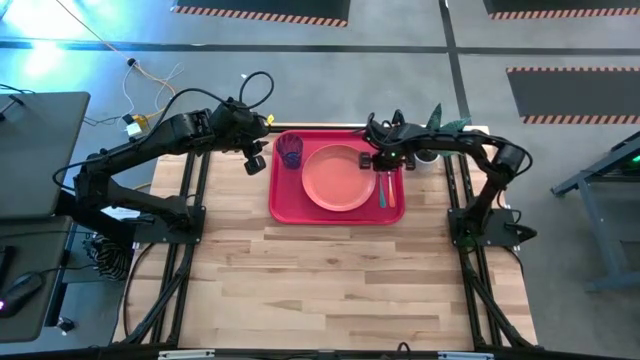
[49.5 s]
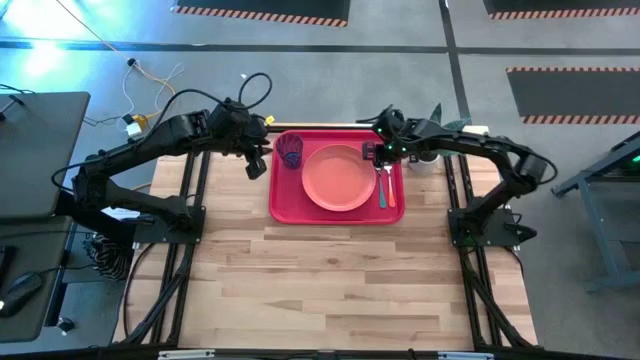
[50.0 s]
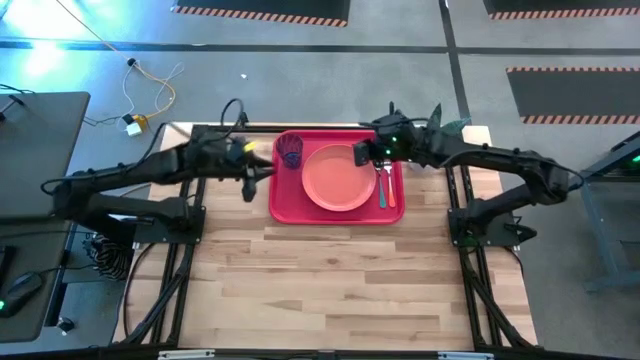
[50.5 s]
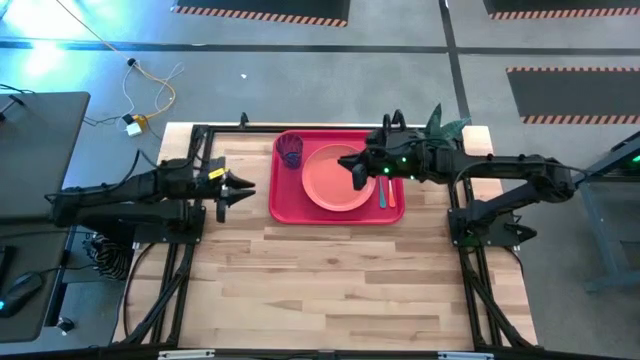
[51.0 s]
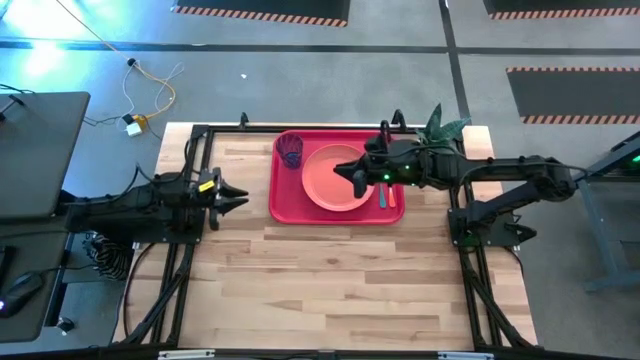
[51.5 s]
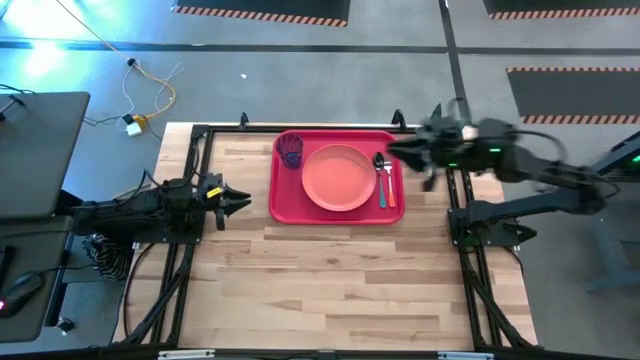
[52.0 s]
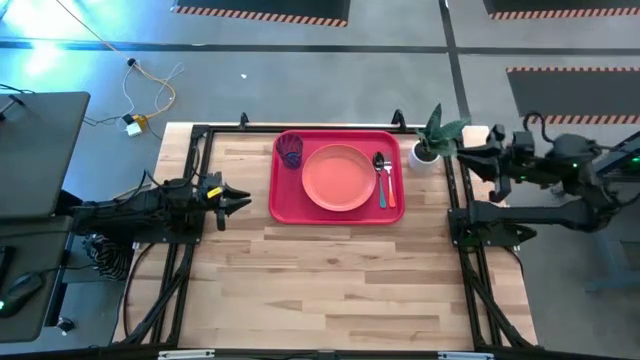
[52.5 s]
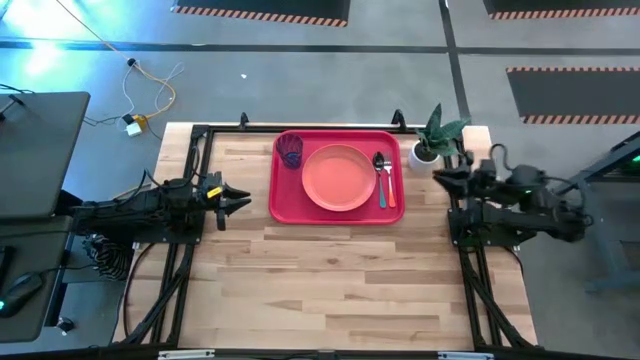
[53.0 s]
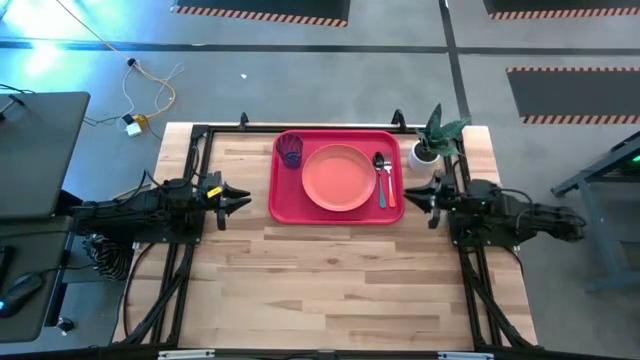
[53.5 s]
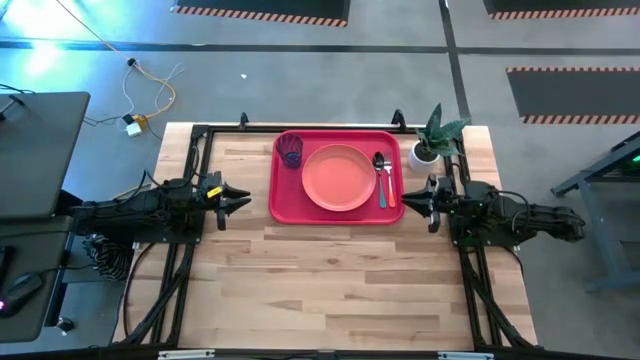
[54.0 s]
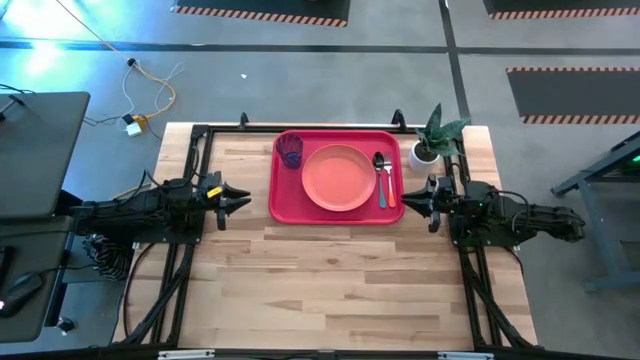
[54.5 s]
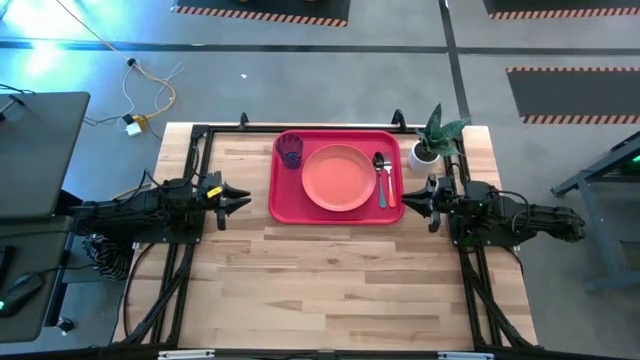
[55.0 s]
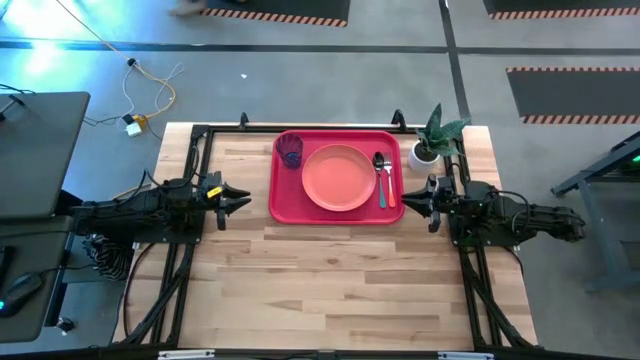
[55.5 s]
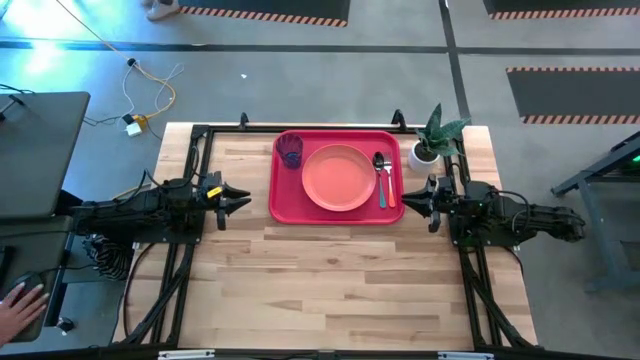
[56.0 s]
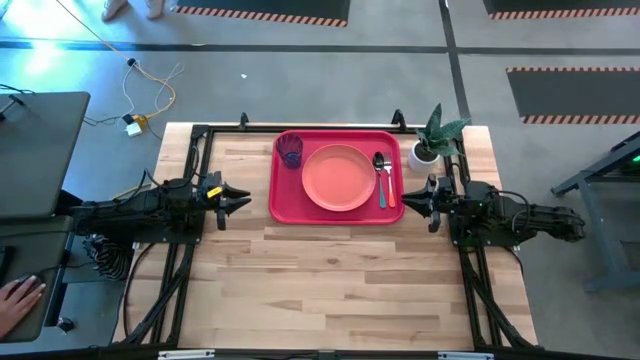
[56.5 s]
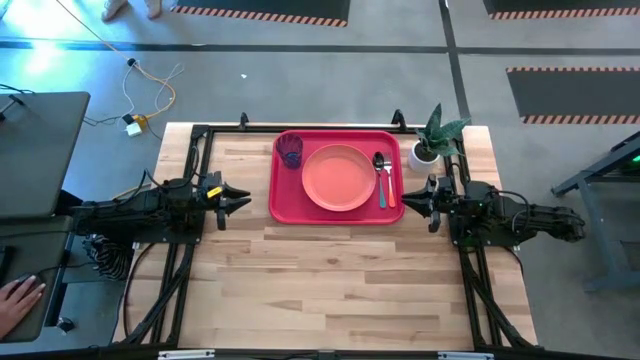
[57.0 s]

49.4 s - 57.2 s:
Task: Pick and place plate/cup/fork/spoon on tray
Return to Home Position

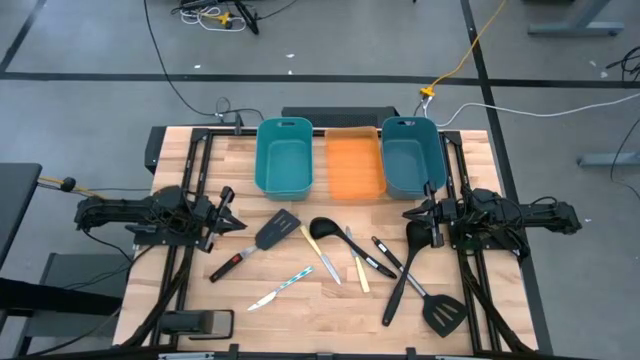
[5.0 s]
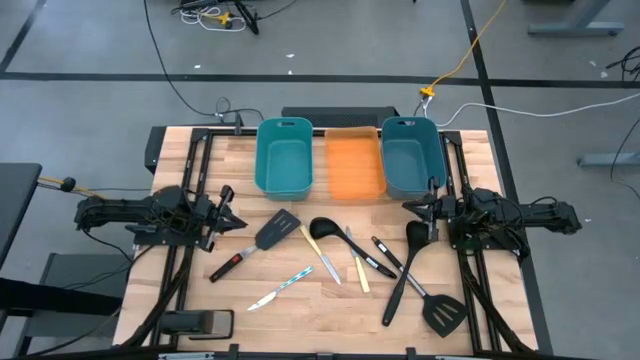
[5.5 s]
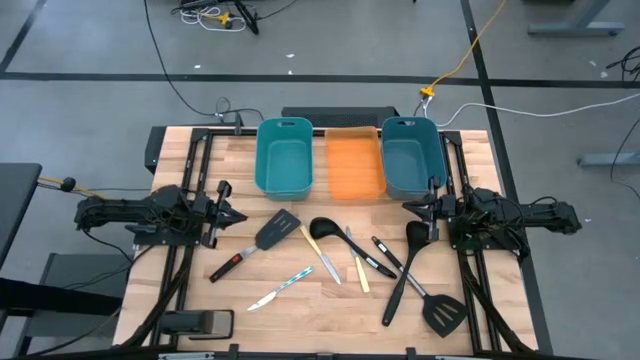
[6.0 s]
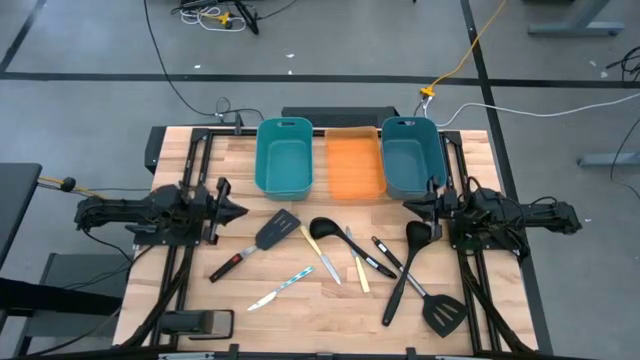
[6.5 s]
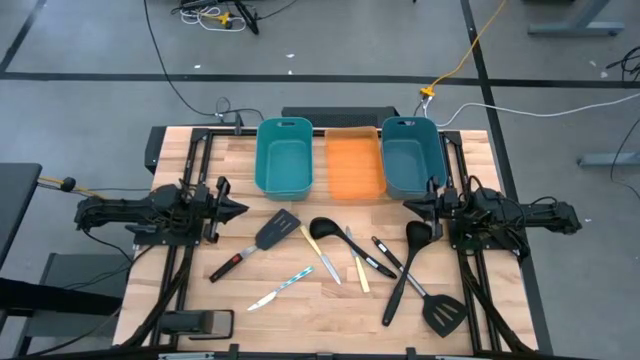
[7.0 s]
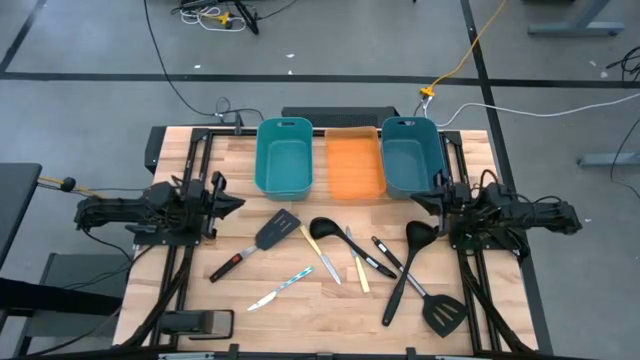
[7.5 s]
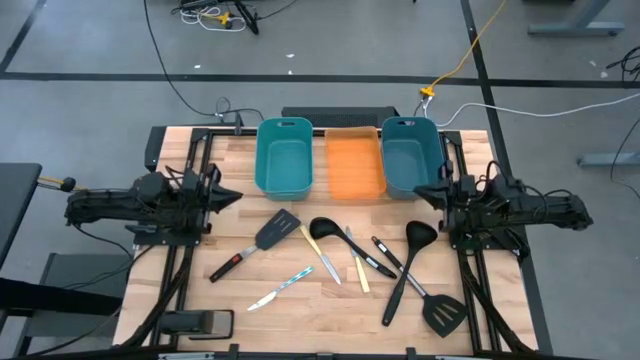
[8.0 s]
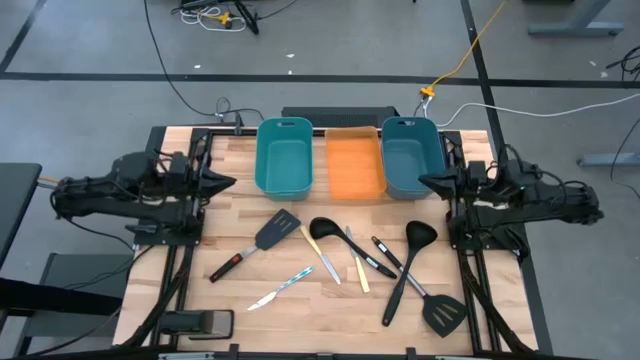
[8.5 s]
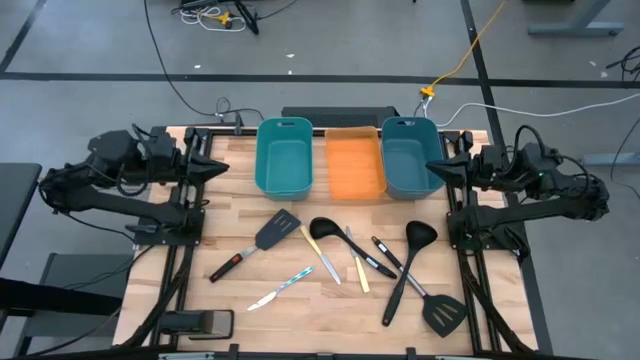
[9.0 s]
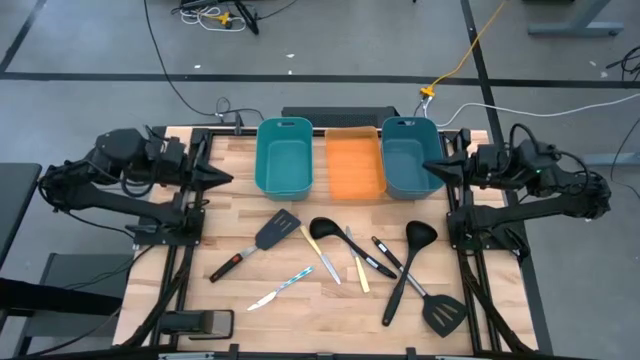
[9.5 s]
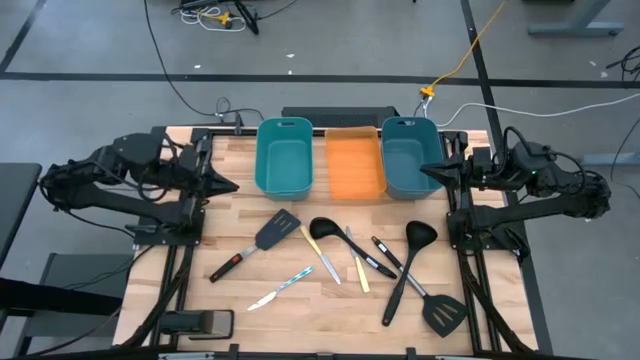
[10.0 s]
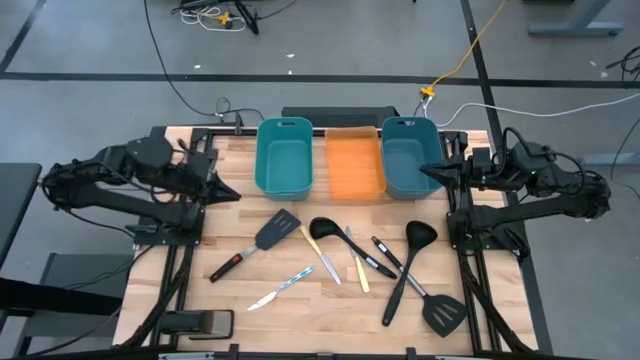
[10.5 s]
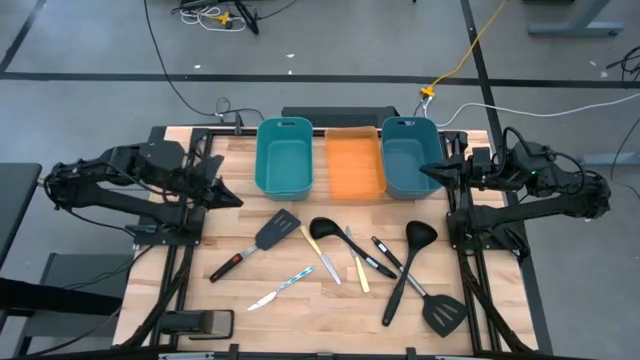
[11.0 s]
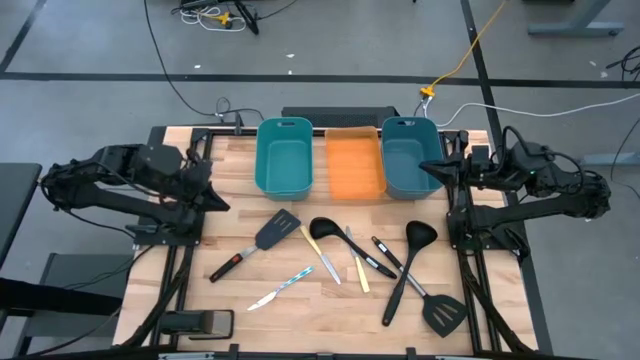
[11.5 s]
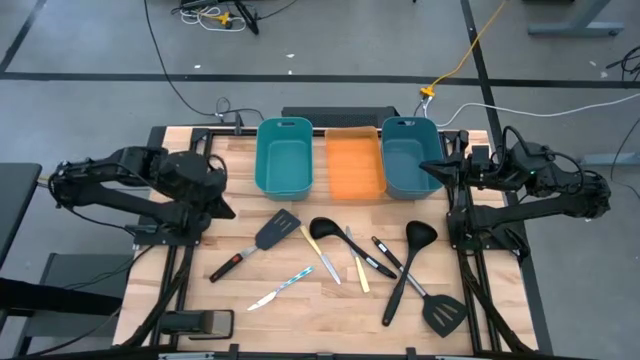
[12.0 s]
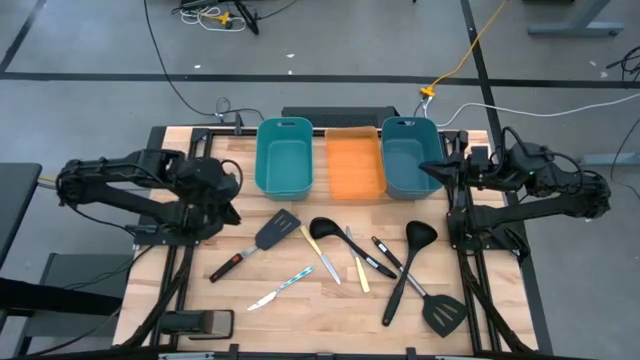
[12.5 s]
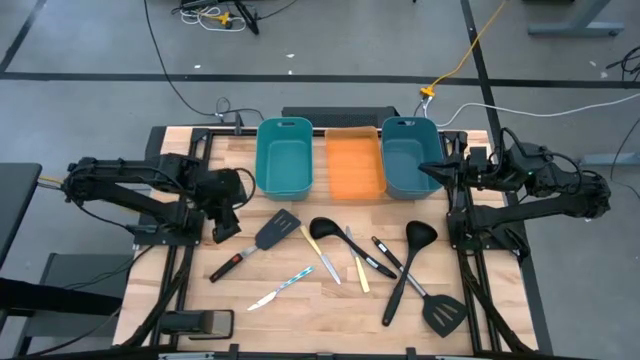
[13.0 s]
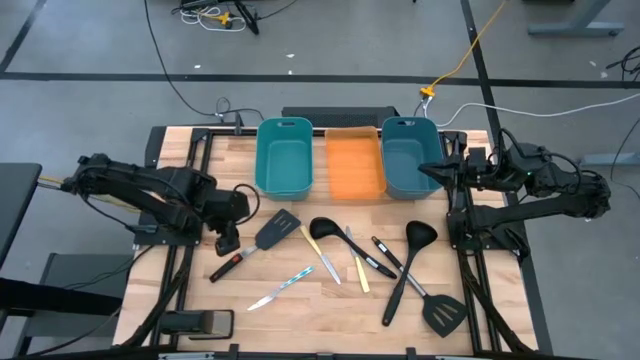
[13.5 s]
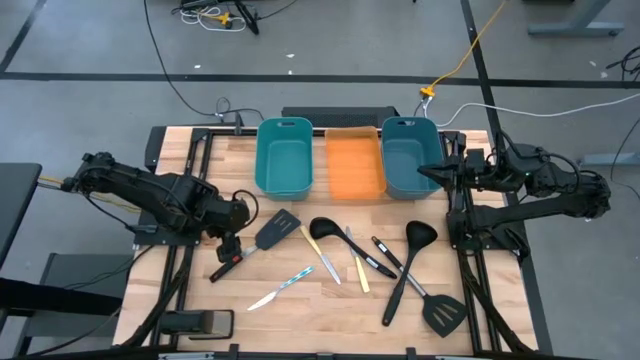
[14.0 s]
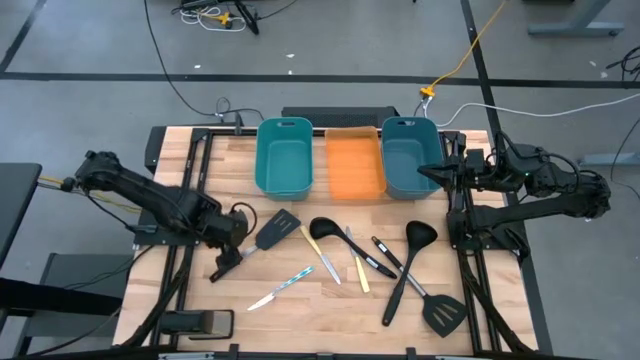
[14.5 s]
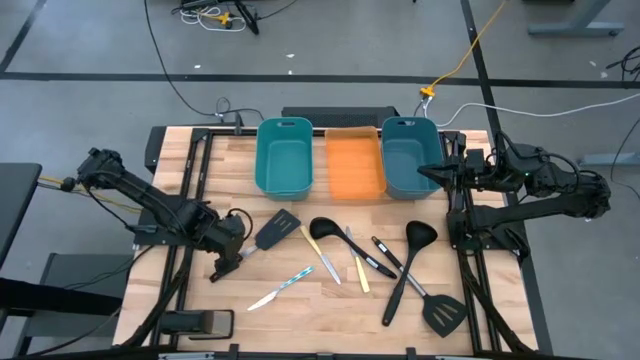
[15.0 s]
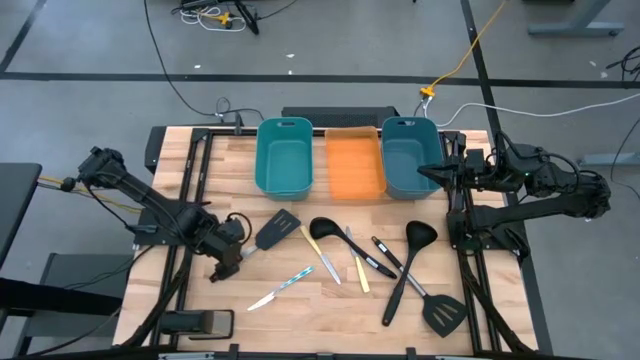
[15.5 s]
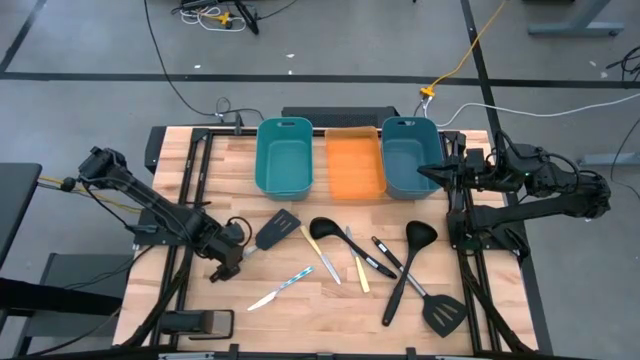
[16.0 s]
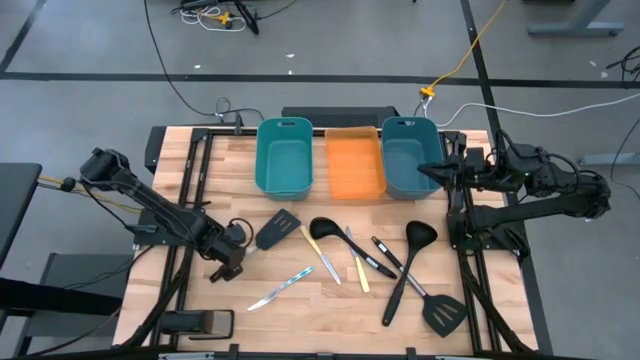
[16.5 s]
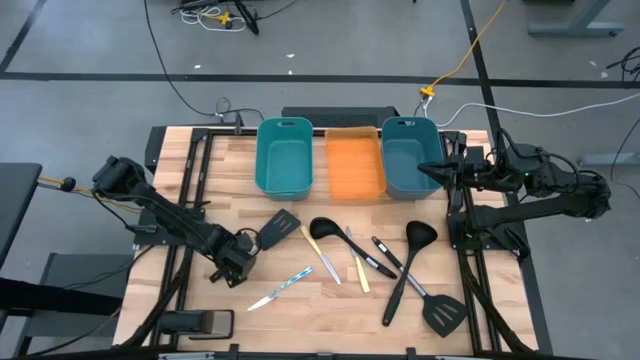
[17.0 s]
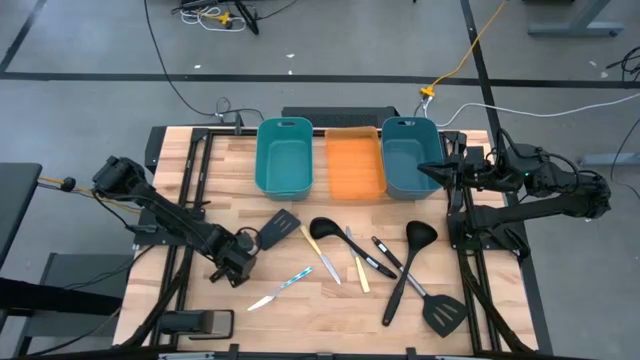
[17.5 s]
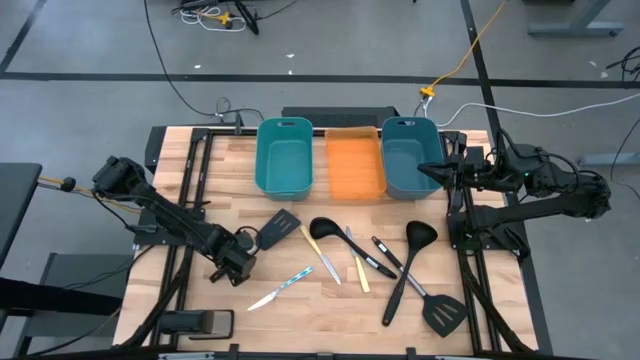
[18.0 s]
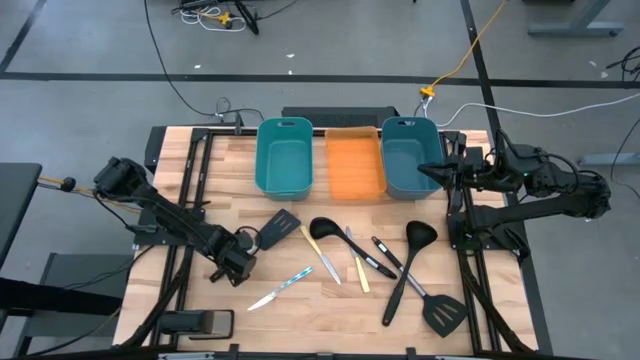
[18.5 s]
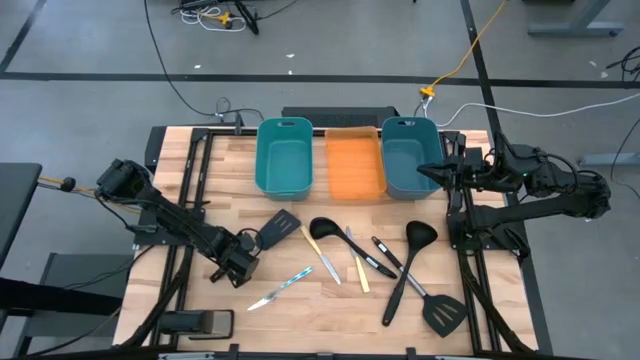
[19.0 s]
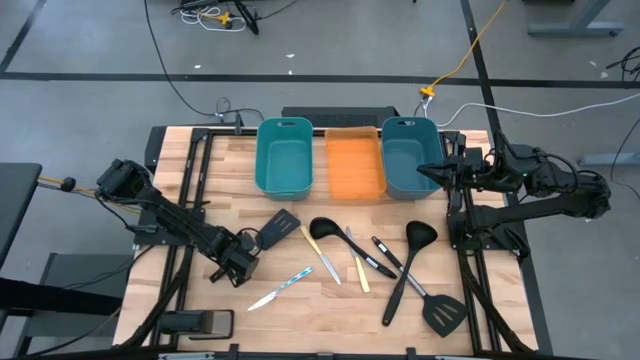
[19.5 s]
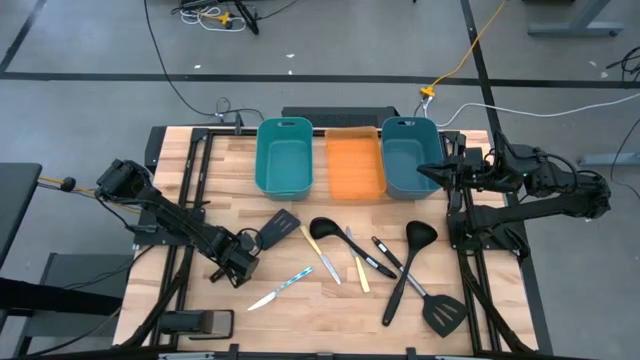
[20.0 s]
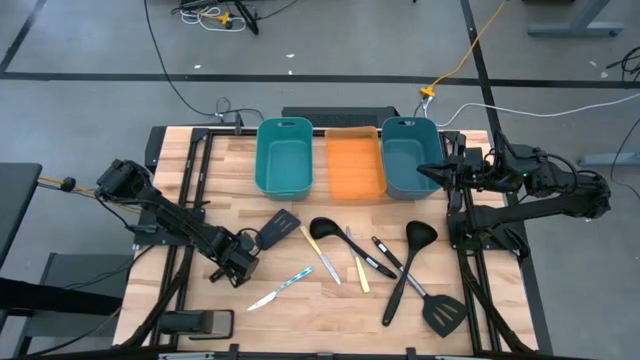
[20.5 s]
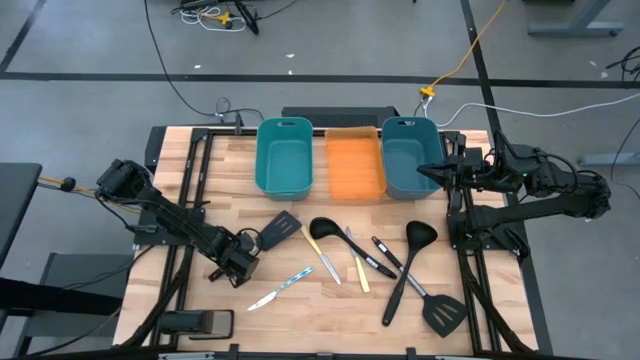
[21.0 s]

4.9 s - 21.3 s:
Task: Pick & Place Kitchen Items
Put the left black spatula into the blue bin
